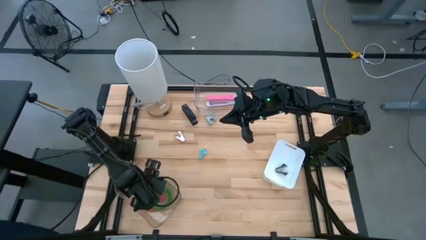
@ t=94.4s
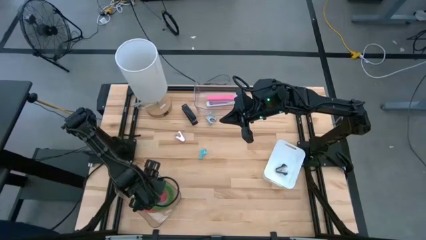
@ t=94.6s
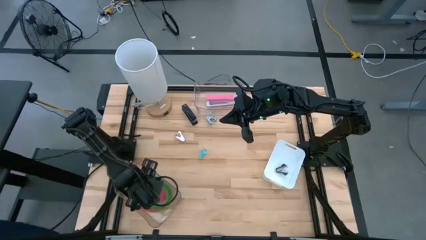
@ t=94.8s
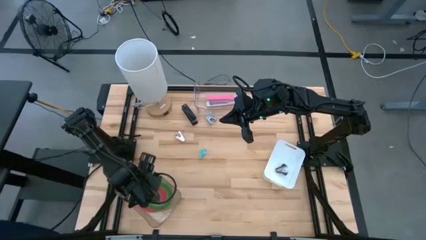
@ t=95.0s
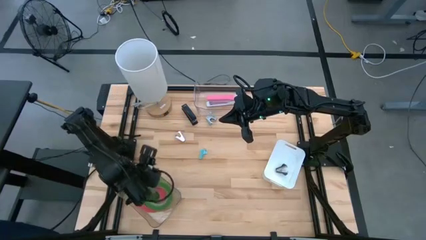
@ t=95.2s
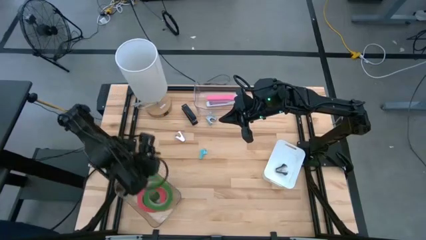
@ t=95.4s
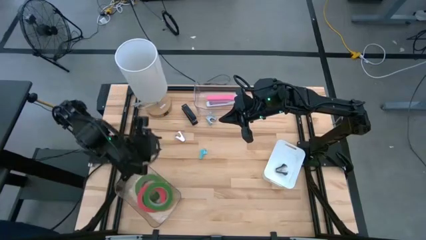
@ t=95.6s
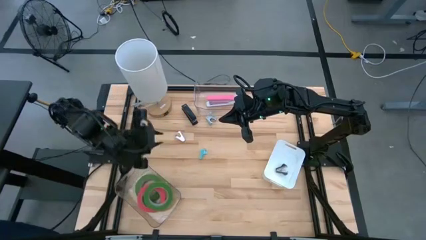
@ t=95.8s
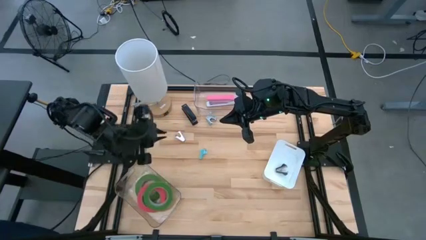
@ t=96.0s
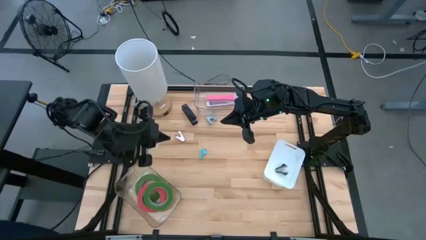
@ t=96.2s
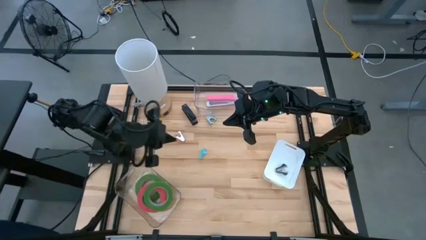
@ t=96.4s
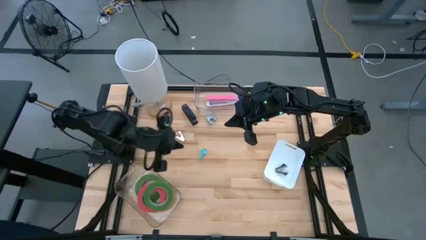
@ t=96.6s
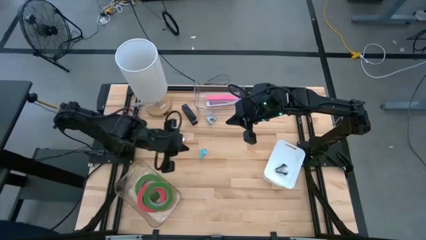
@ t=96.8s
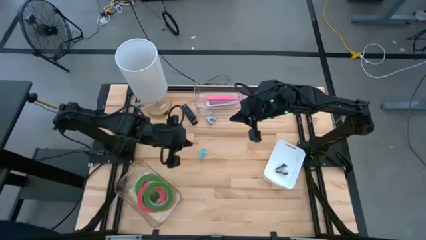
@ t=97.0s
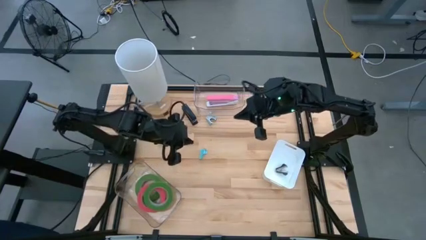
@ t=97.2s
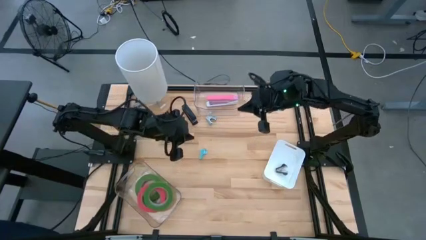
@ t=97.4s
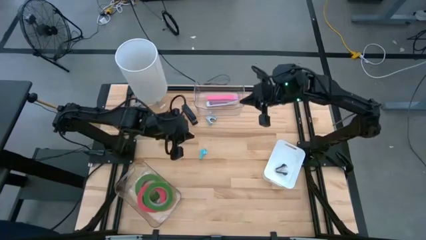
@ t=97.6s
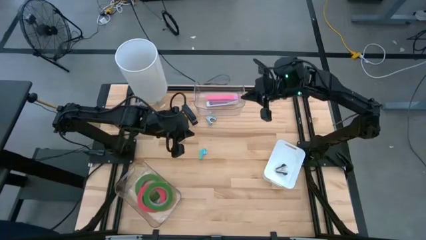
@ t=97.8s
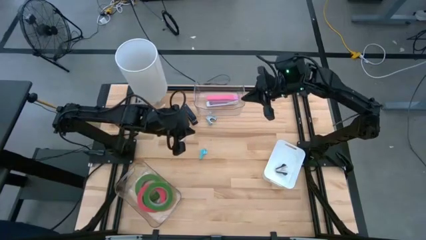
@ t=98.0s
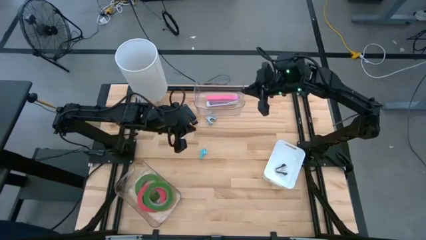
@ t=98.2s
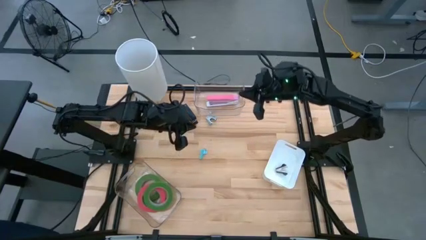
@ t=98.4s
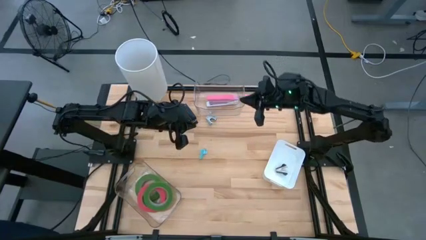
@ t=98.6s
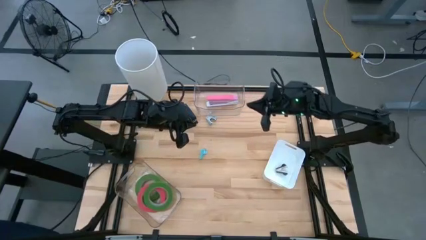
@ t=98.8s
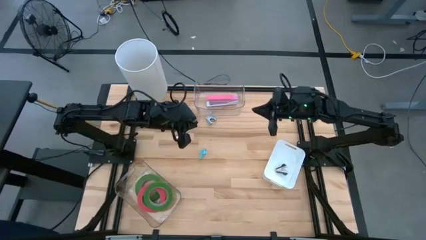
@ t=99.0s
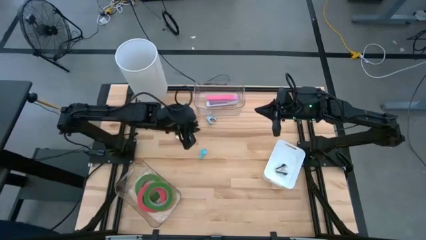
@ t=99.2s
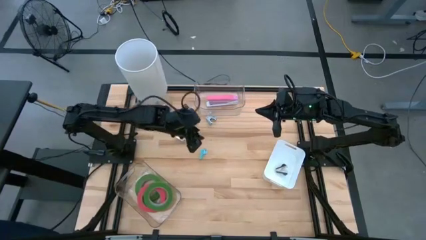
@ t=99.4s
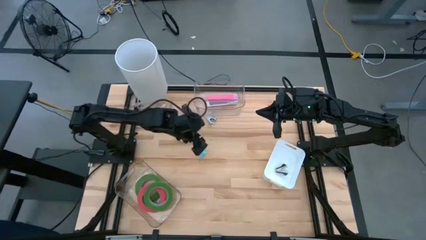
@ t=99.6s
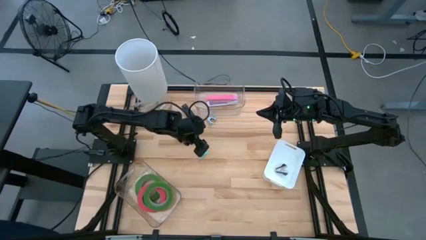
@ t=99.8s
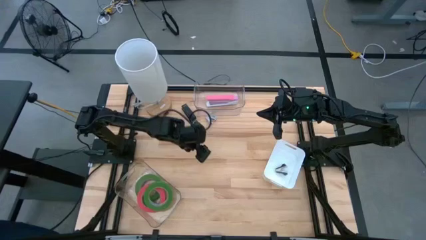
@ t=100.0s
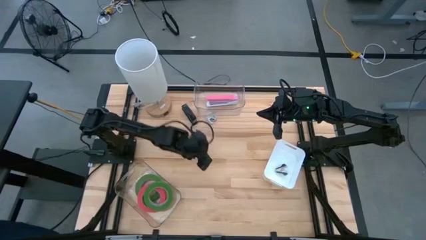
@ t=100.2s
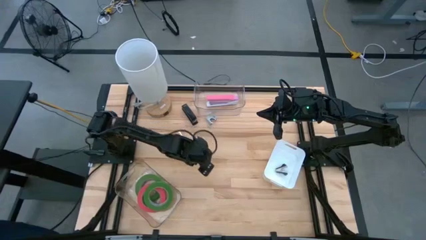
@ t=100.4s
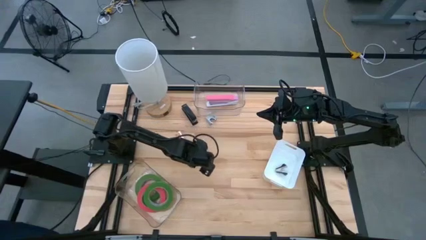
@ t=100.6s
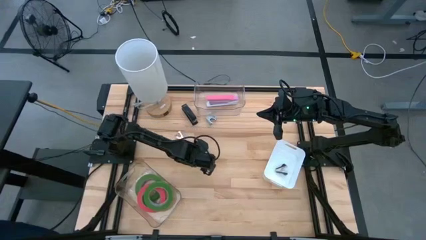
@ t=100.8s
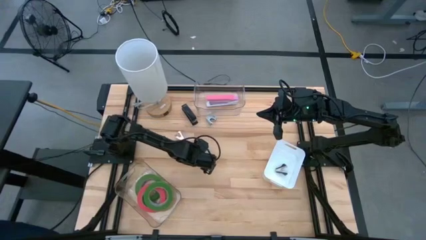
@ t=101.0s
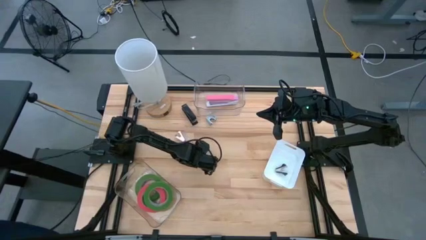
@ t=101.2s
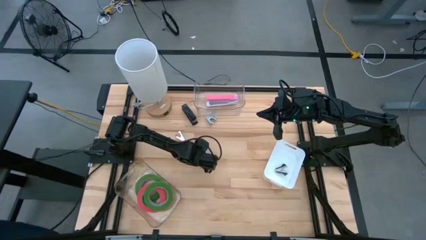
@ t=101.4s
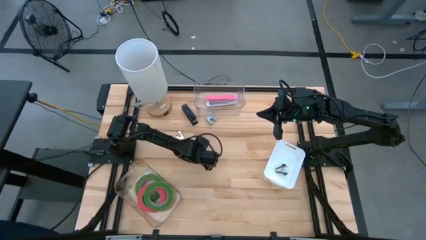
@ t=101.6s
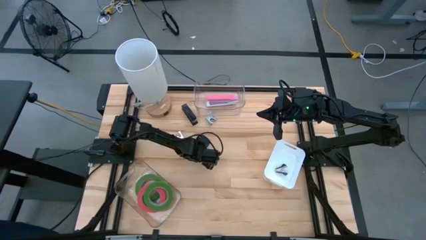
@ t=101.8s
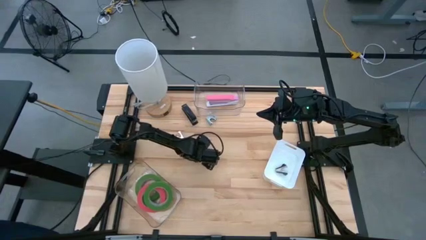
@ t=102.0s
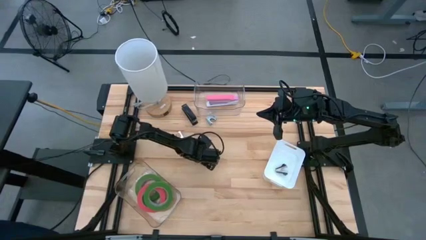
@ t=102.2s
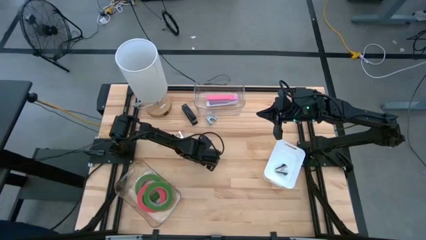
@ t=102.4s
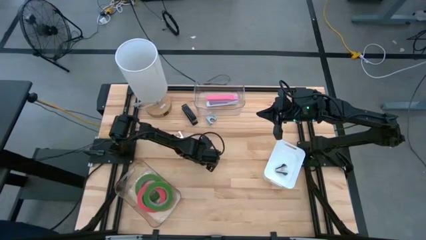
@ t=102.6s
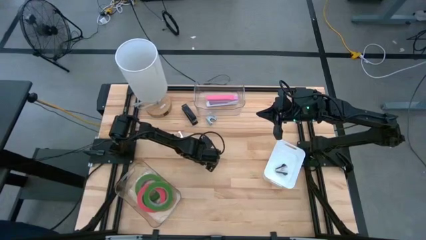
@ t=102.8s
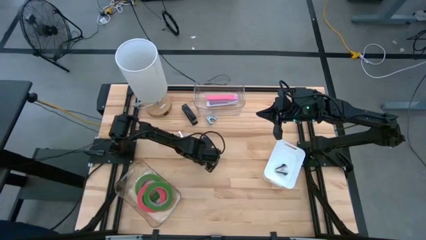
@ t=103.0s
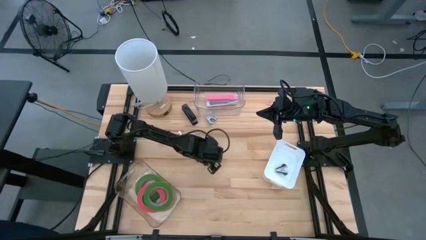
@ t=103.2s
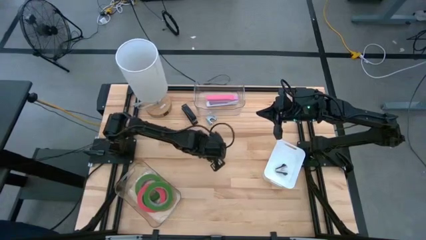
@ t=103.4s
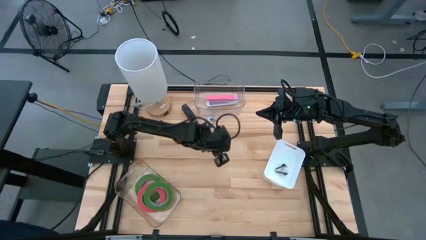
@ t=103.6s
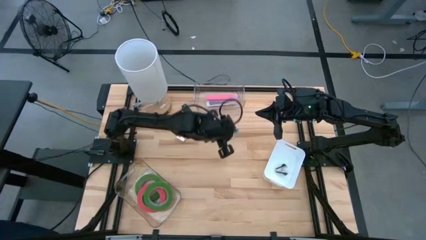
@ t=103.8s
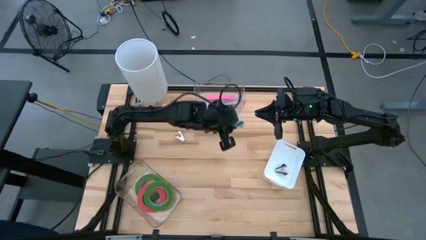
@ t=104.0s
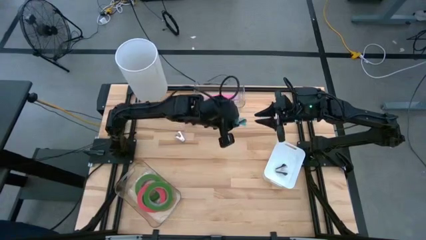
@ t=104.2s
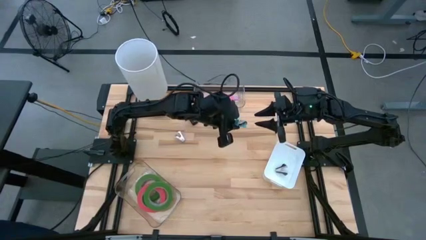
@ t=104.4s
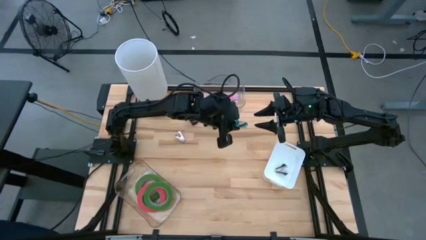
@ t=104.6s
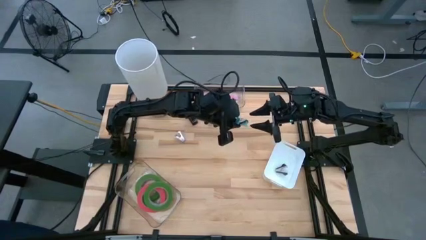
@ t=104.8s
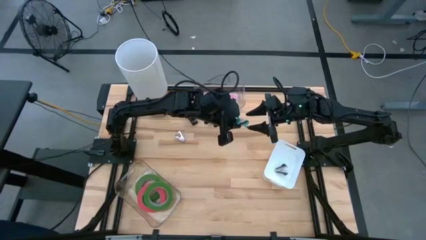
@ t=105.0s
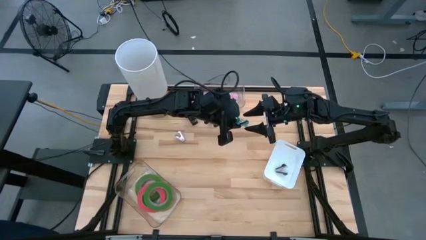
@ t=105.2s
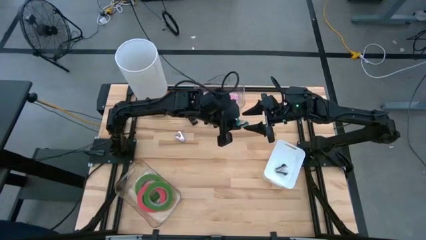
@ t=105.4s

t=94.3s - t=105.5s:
Task: Pick and place Stapler, Stapler remover, tape
Put the light blue staple remover into the white bin

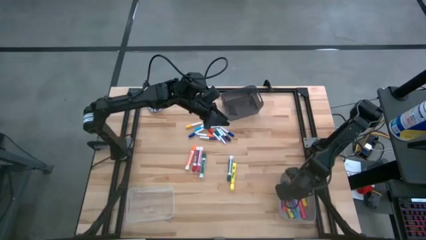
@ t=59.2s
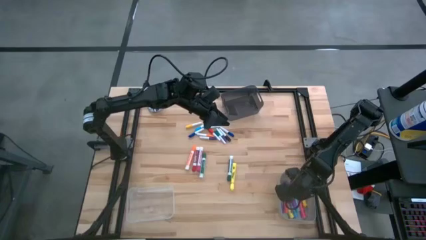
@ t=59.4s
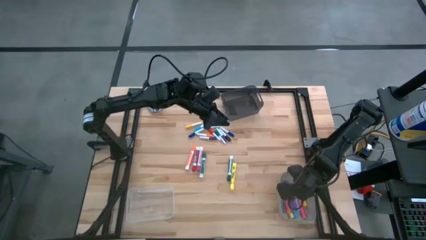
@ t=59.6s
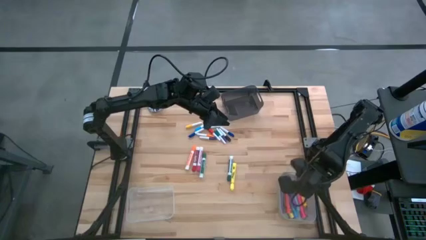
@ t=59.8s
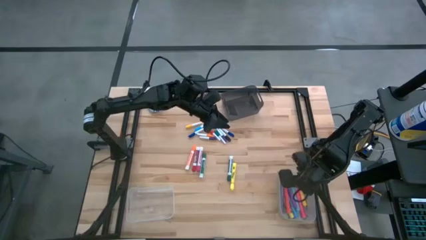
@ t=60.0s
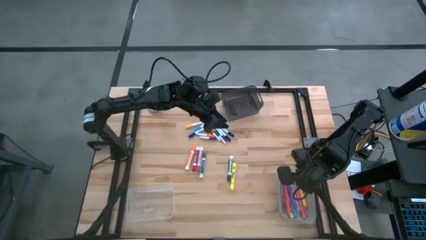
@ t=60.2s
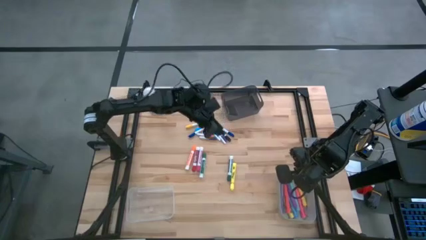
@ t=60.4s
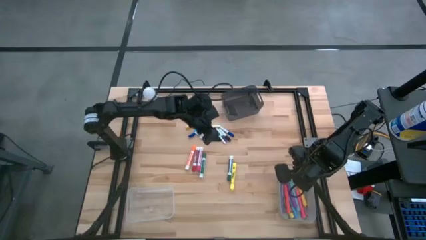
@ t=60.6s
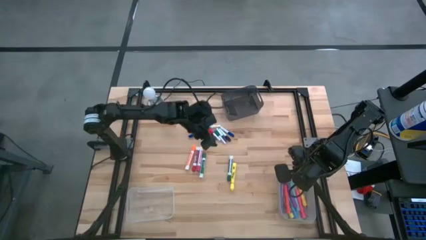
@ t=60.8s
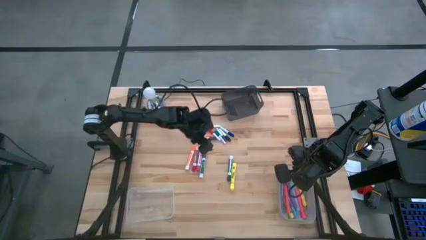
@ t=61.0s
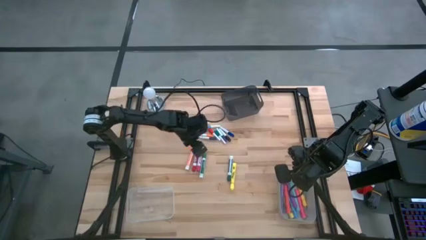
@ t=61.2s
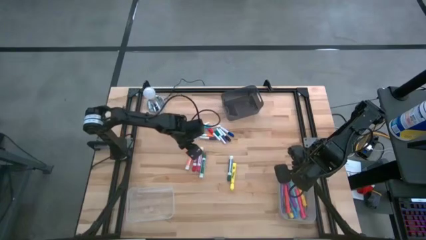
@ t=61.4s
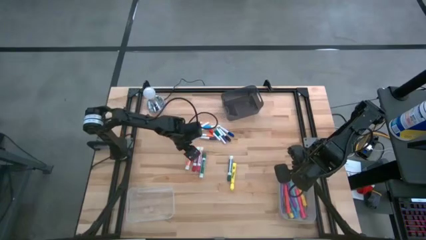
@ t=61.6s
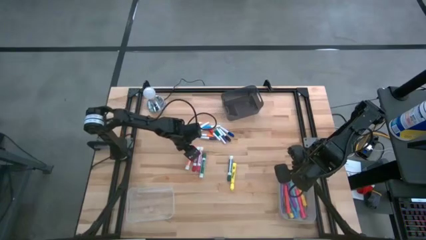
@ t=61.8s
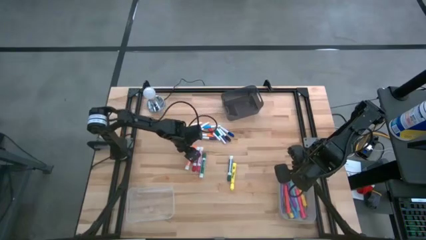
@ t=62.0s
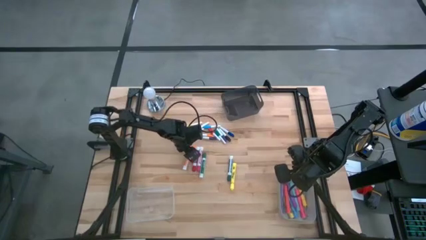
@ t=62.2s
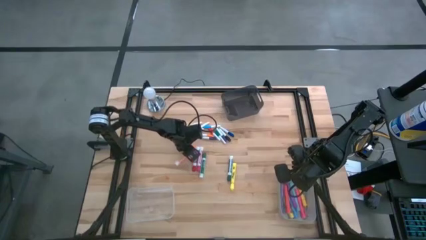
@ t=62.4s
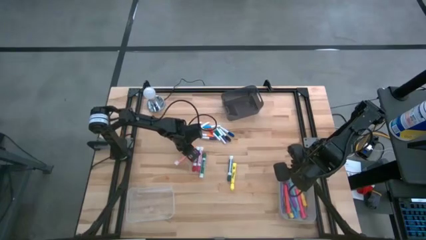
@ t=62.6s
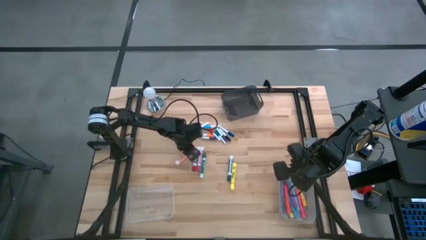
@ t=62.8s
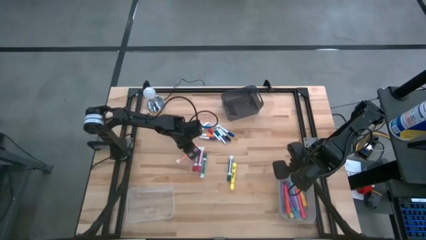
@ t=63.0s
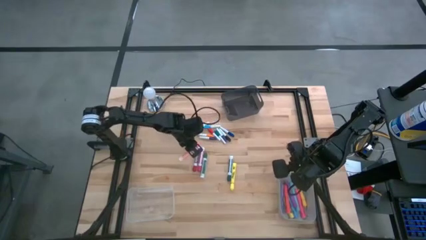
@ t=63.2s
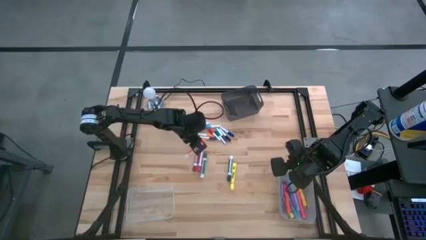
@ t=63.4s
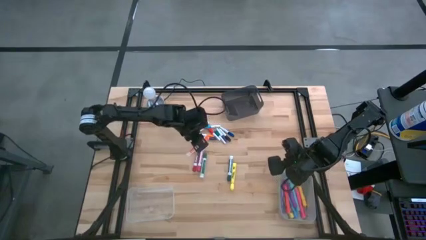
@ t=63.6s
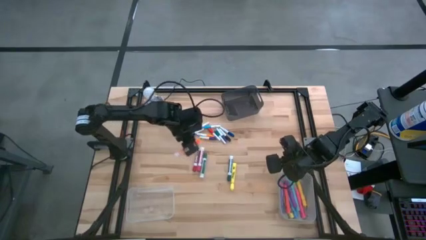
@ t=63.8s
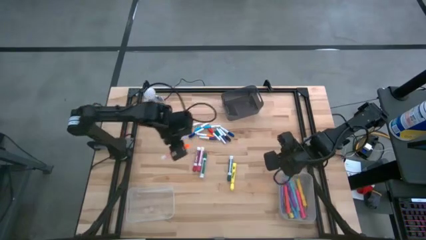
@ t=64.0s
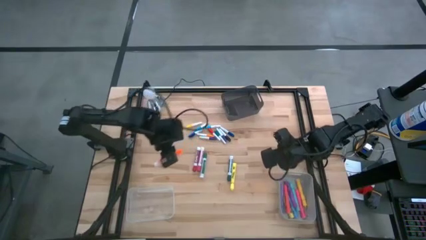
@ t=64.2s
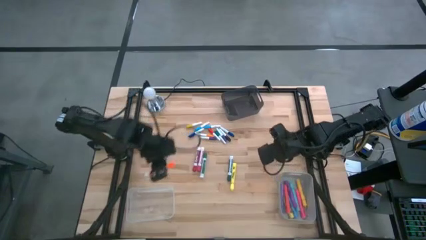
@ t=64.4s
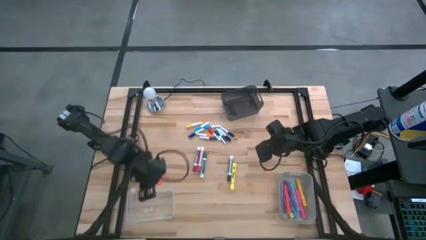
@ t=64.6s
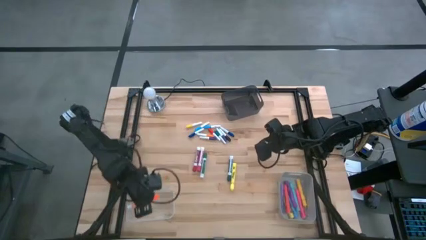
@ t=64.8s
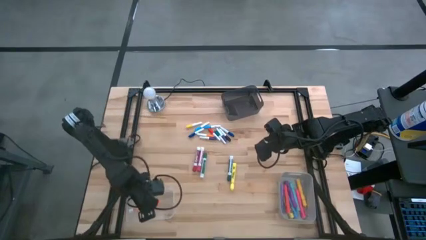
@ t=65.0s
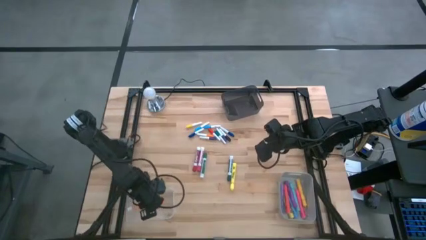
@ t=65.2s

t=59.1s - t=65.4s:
Task: Pick & Place Markers
Put the orange marker pen into the transparent bin
